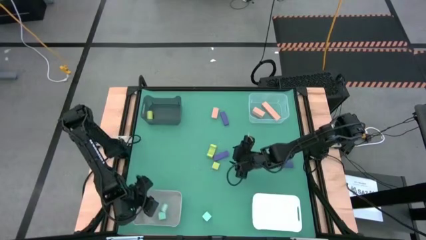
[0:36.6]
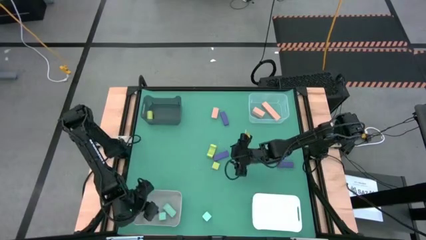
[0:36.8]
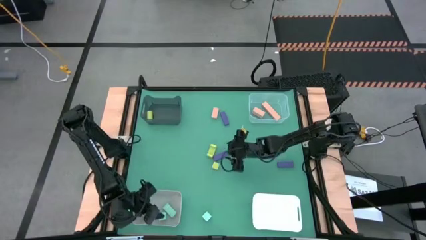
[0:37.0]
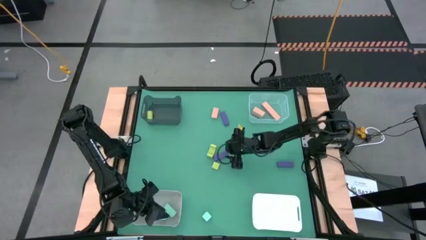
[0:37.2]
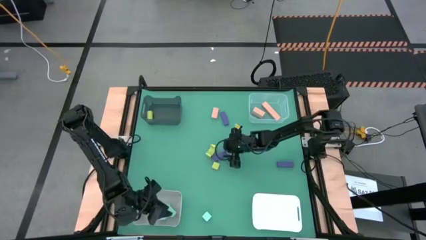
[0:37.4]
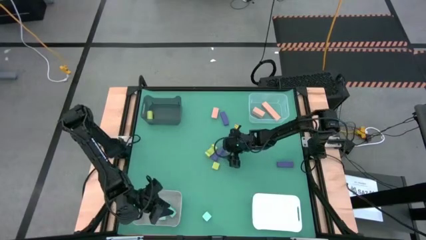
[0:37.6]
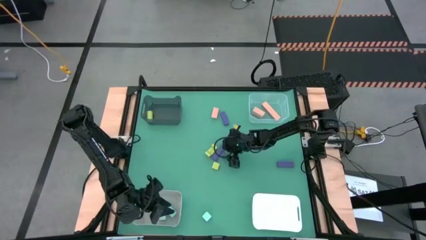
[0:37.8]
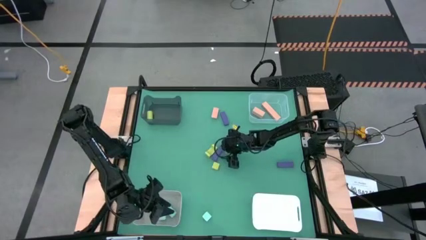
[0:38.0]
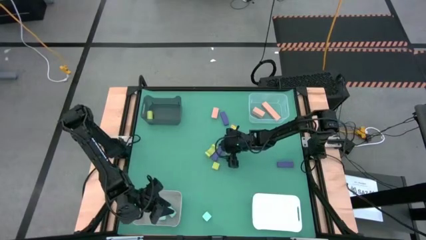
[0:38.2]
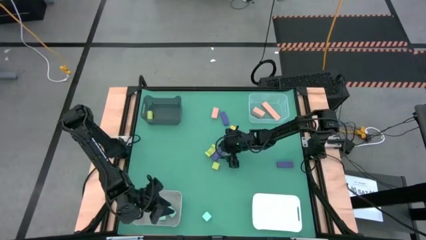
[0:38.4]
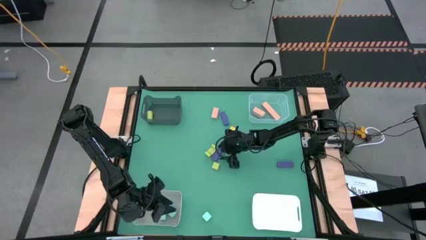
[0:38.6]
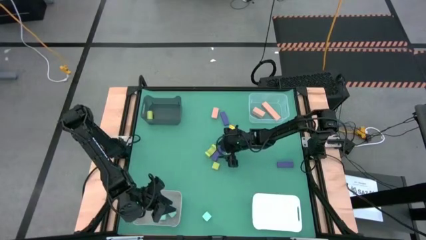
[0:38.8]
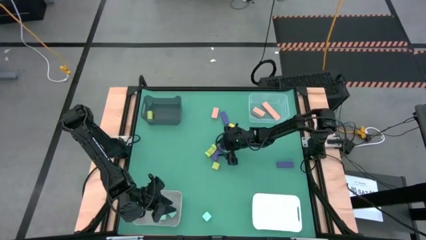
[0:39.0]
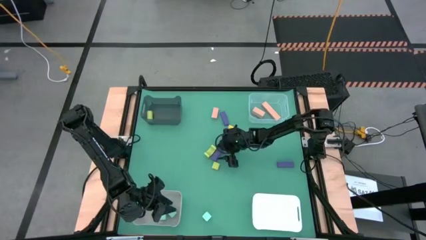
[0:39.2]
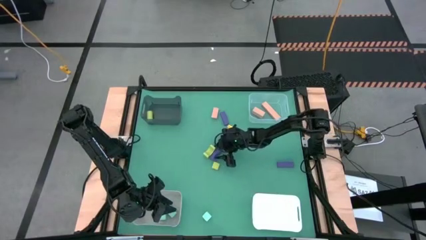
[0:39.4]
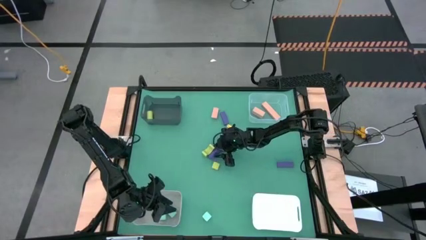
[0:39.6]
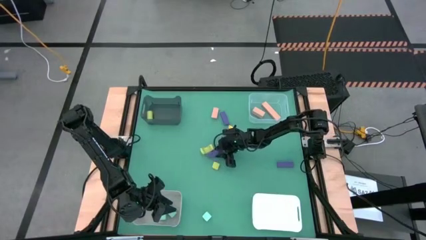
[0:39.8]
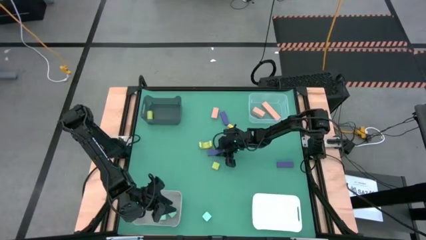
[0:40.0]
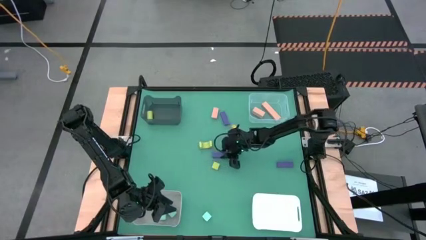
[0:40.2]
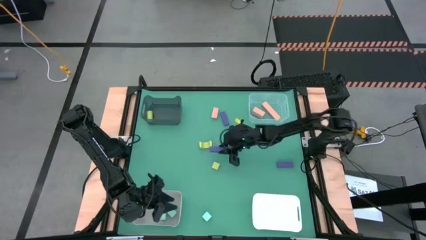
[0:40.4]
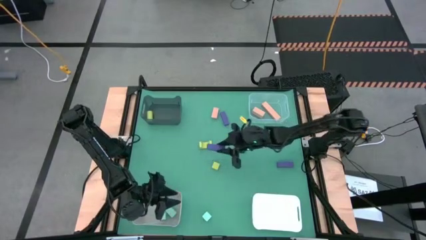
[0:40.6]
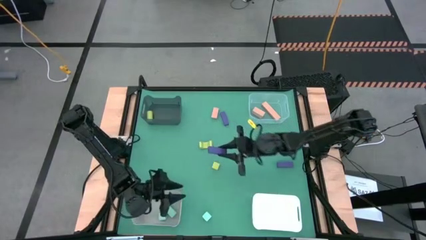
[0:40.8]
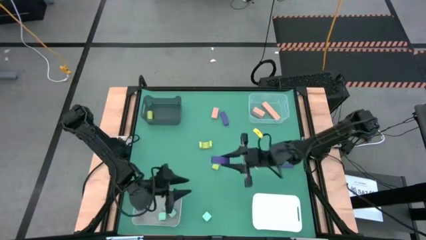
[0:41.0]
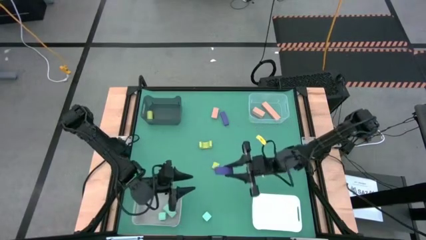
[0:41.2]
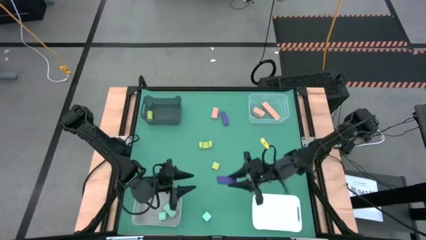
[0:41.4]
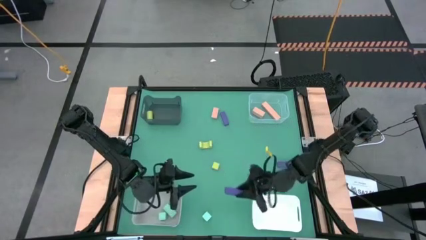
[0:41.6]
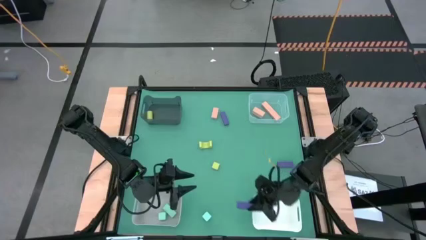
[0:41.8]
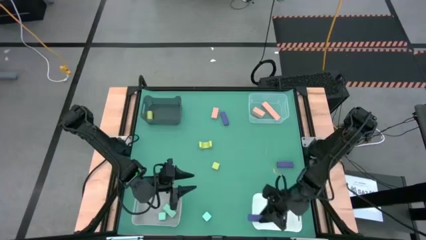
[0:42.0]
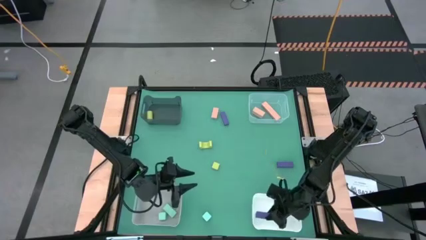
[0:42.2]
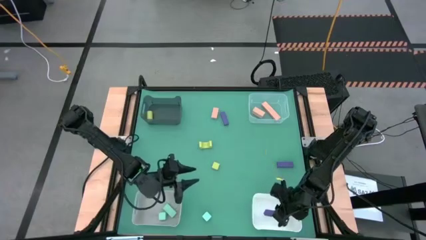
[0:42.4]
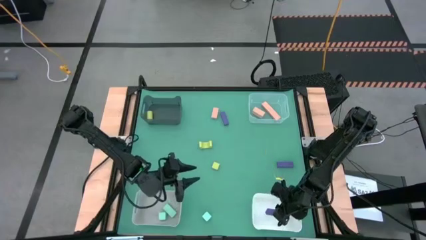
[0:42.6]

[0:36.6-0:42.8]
Task: Sort & place blocks by color
Put the middle violet block into the white bin

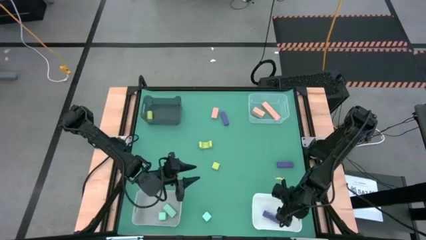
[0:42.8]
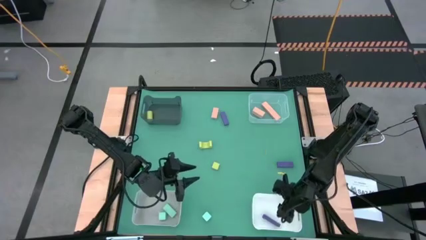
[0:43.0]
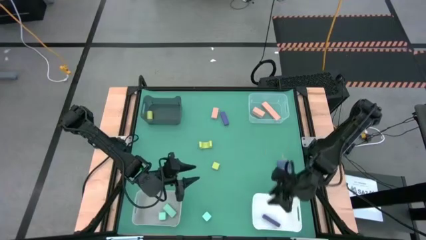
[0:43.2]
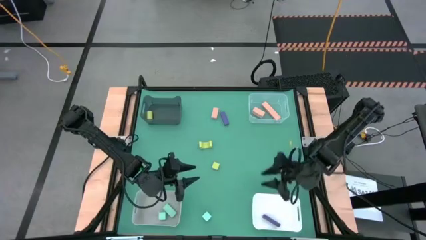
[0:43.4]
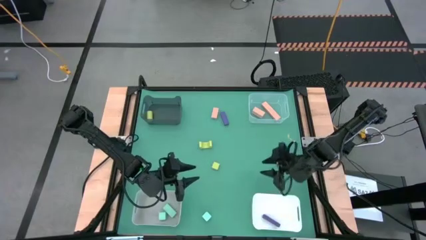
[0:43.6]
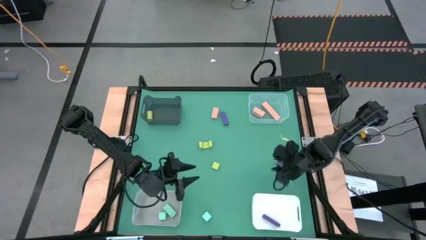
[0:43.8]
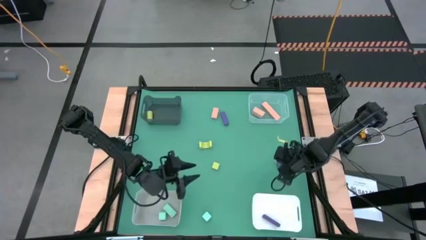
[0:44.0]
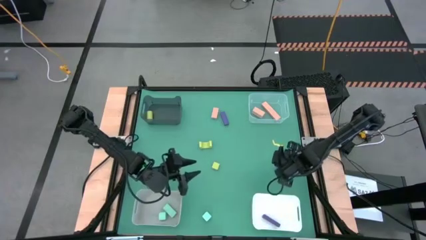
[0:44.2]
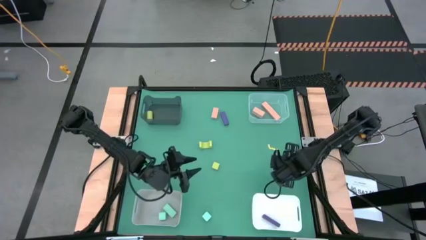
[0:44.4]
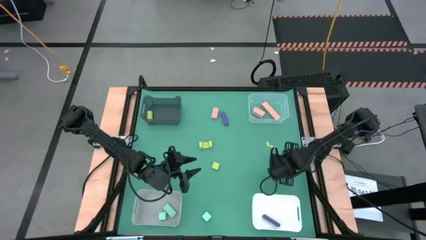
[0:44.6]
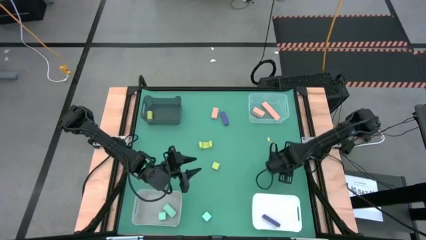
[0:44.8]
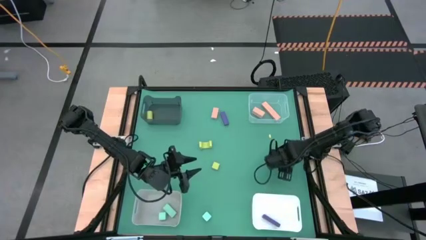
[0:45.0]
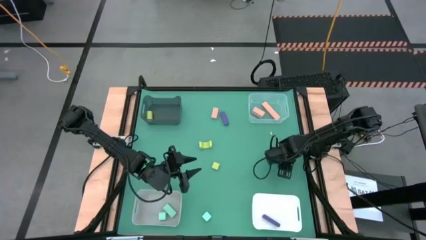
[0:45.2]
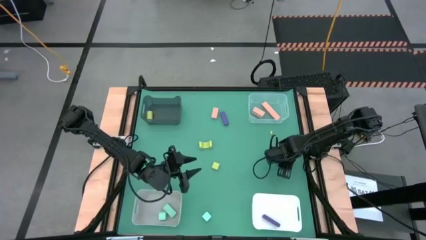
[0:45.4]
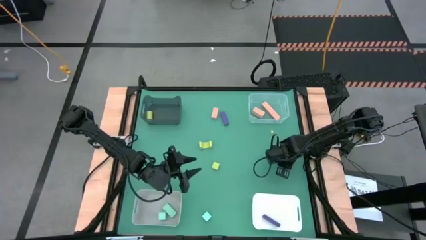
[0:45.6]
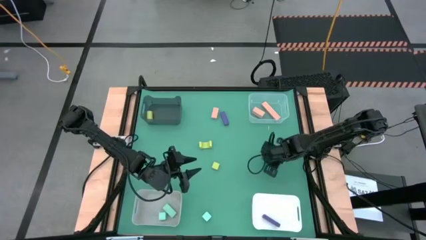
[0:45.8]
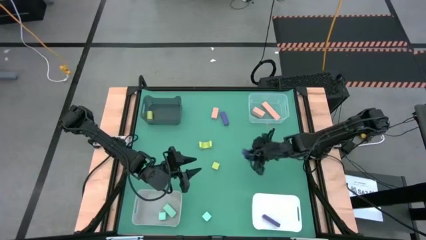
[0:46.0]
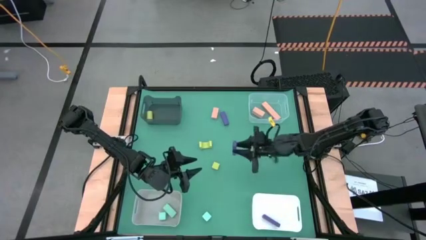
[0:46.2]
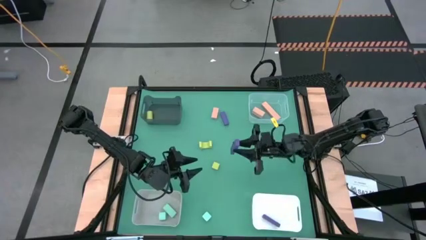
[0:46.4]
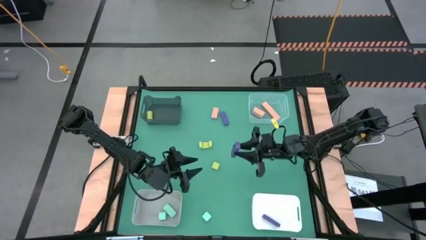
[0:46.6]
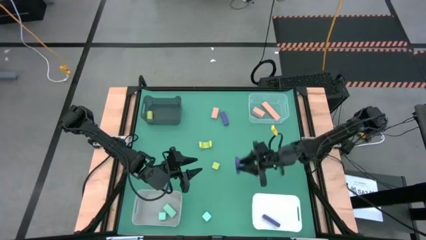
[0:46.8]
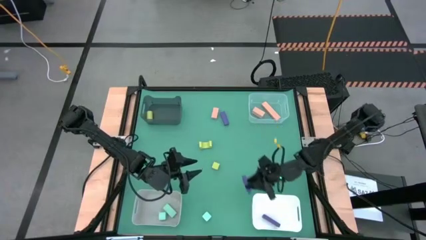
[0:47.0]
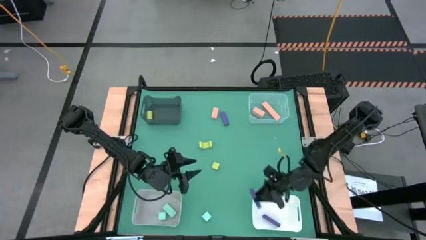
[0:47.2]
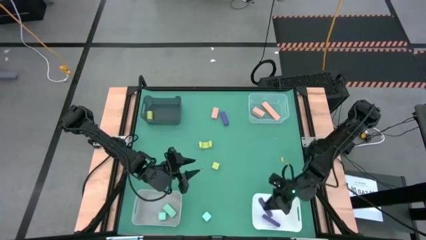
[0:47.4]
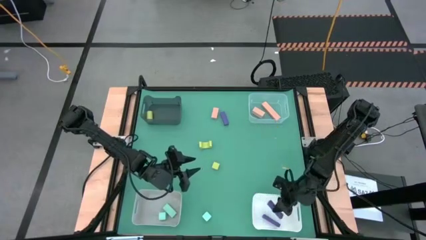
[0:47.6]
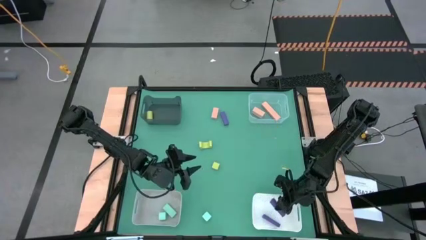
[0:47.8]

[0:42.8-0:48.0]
Put the bottom violet block into the white bin

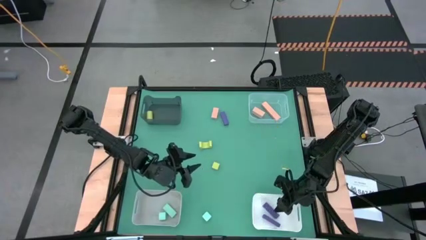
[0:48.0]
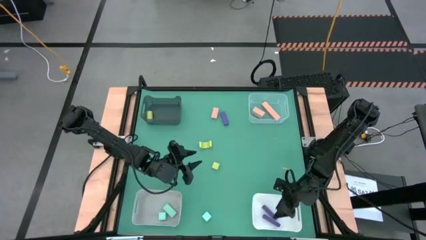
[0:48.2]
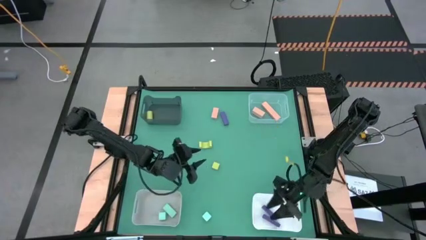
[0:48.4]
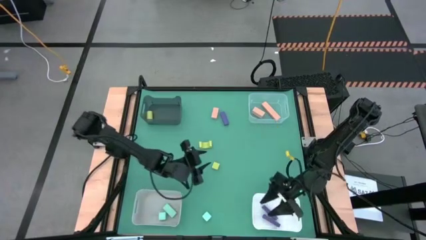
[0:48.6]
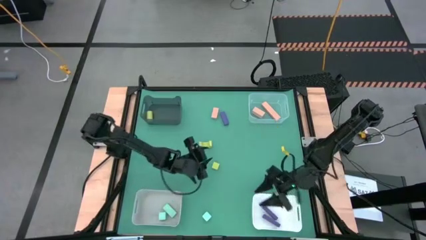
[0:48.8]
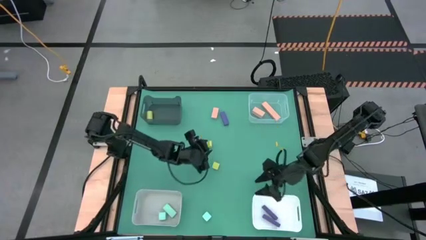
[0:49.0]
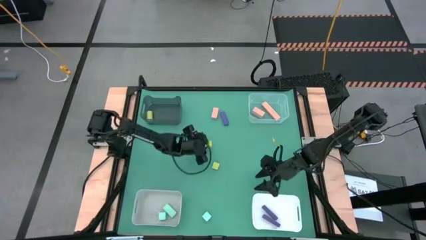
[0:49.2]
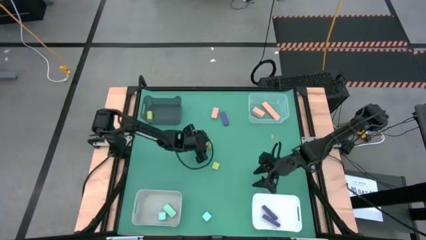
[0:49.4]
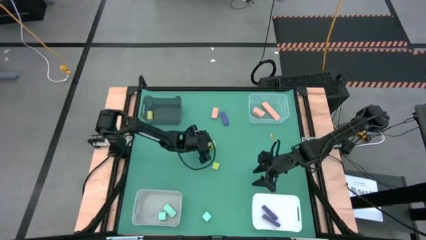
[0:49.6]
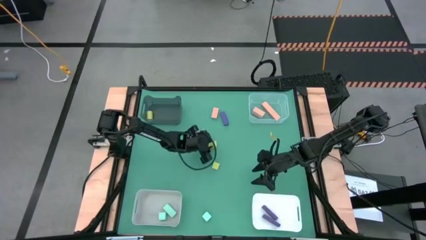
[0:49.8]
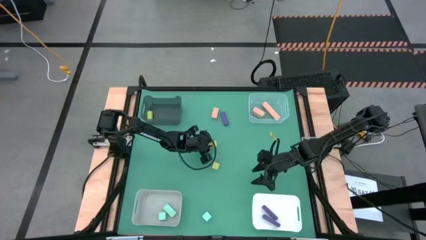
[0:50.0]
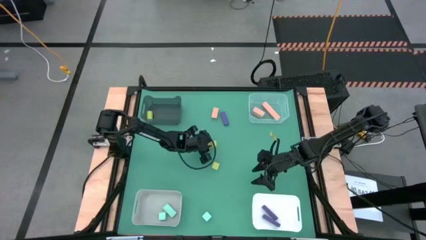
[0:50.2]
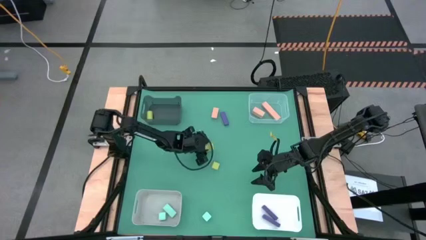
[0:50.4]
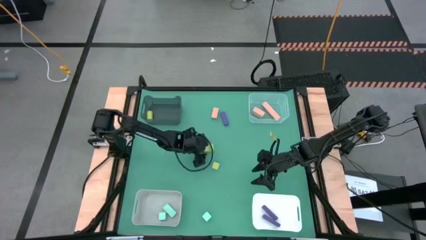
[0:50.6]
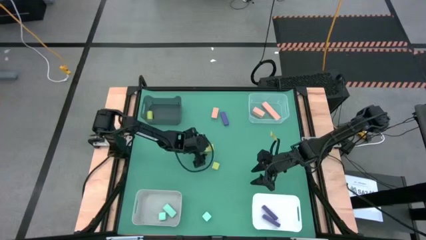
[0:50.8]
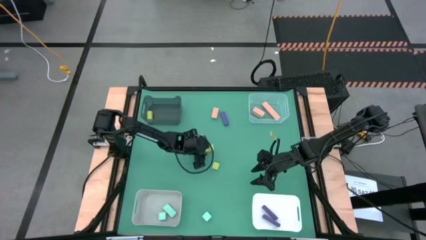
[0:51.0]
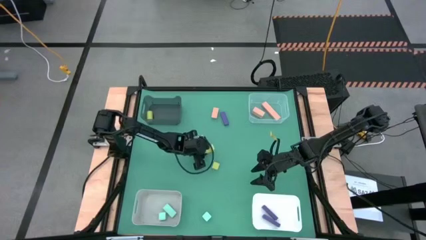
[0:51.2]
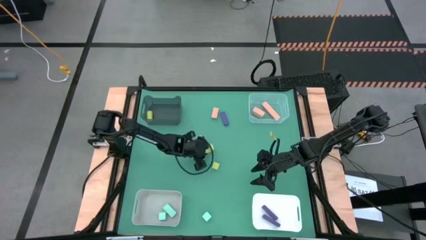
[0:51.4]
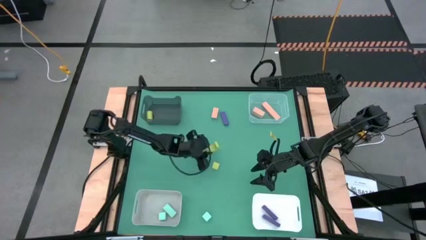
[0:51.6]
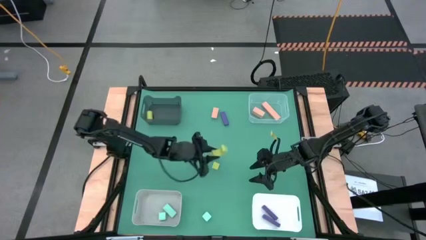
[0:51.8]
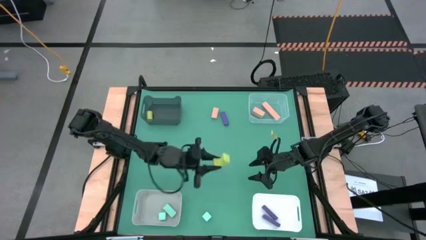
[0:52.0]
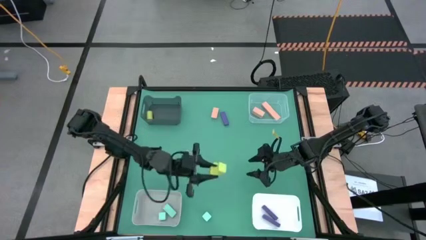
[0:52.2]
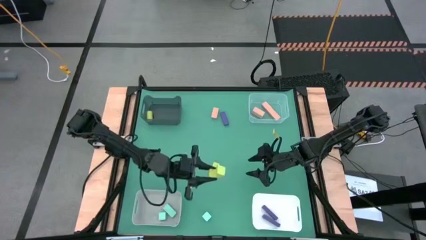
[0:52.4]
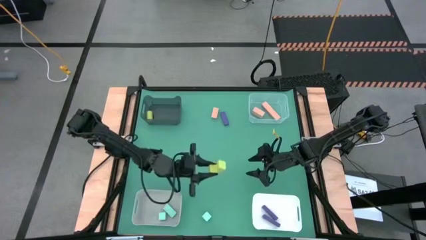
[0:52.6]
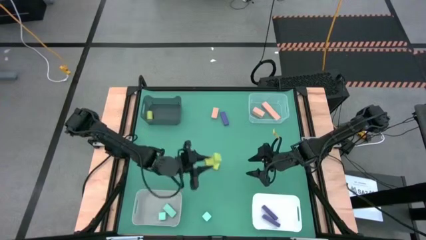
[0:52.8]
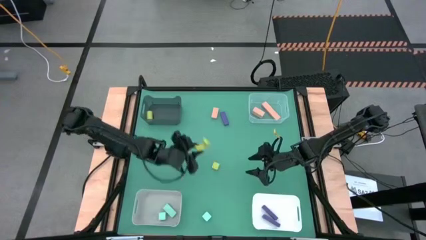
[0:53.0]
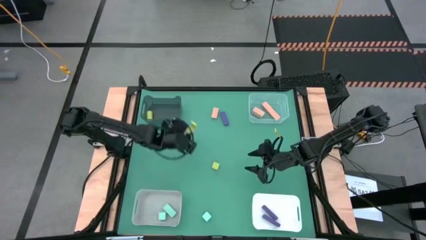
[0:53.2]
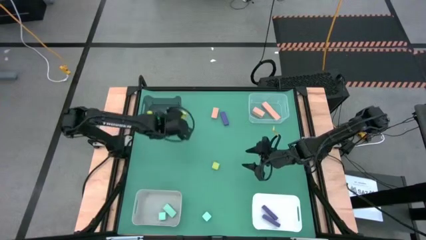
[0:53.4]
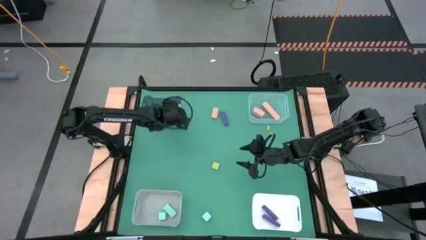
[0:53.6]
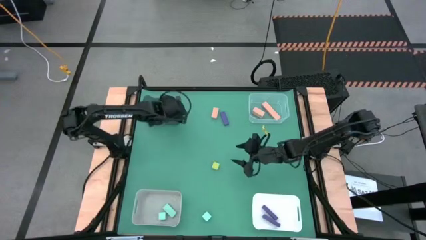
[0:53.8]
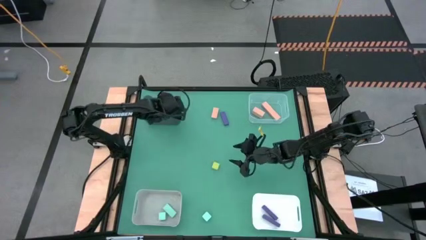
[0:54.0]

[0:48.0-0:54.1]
Put the top light green block into the black bin
